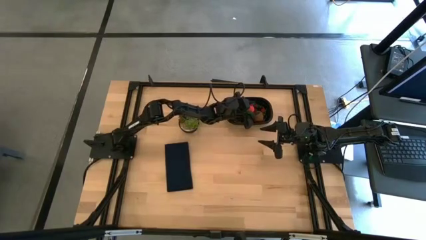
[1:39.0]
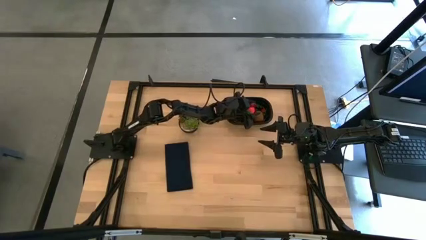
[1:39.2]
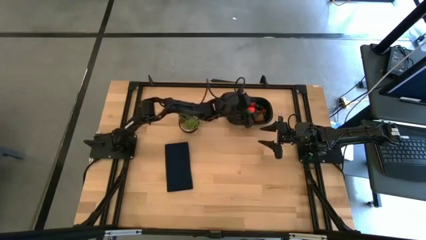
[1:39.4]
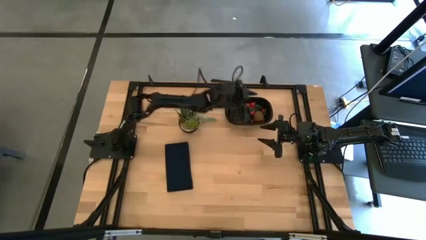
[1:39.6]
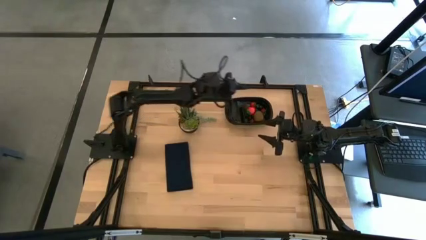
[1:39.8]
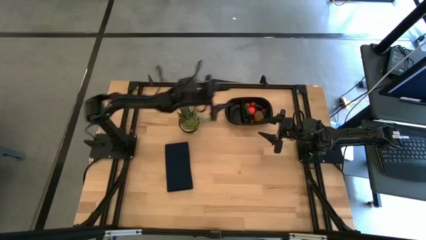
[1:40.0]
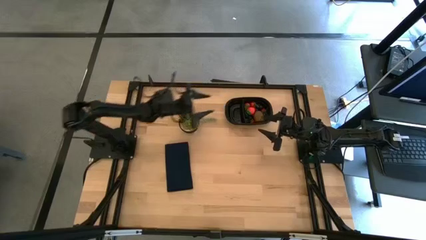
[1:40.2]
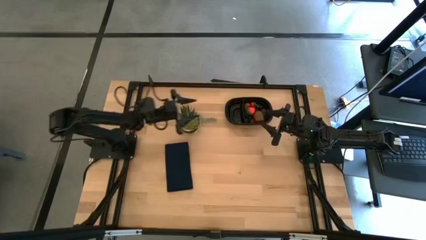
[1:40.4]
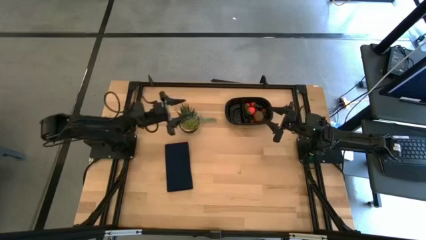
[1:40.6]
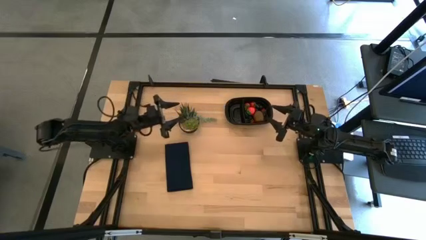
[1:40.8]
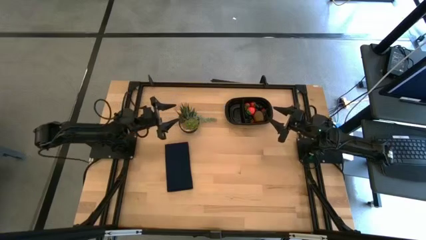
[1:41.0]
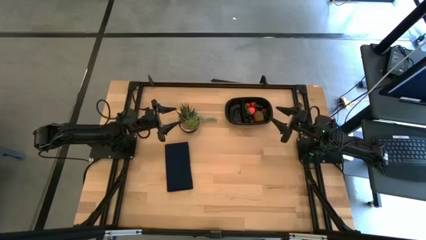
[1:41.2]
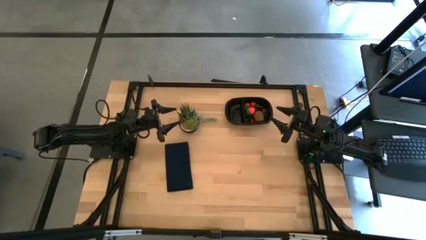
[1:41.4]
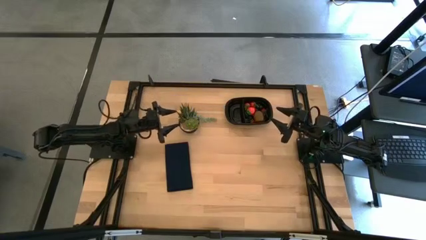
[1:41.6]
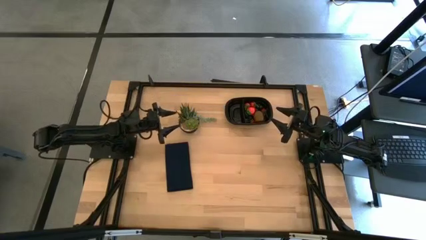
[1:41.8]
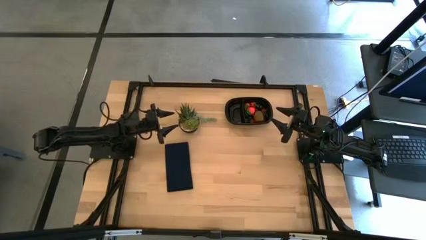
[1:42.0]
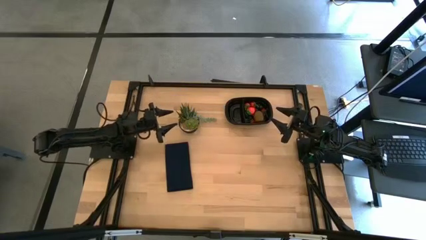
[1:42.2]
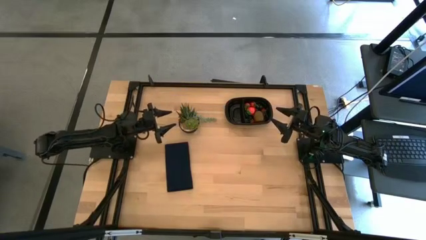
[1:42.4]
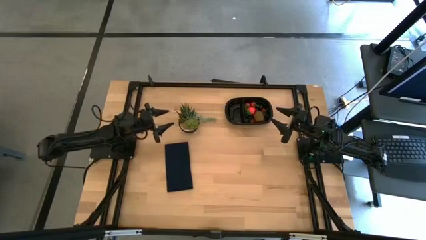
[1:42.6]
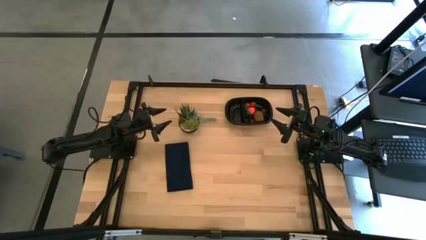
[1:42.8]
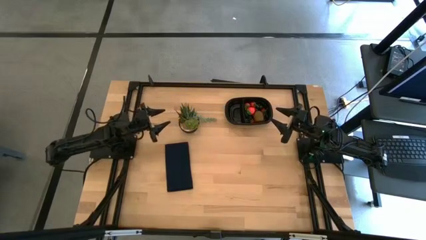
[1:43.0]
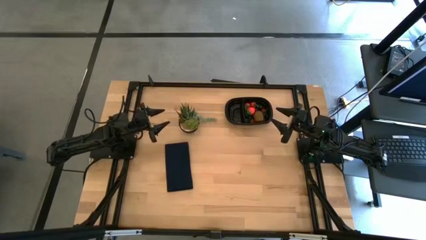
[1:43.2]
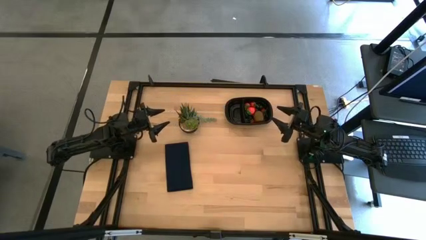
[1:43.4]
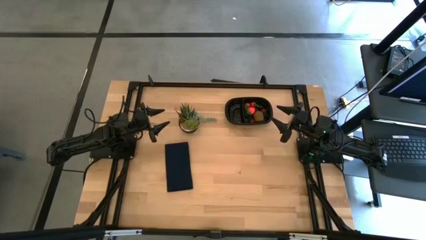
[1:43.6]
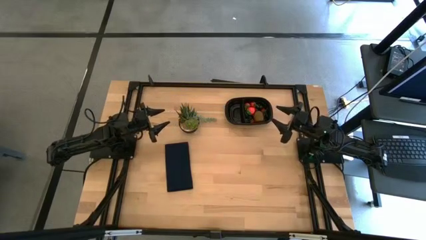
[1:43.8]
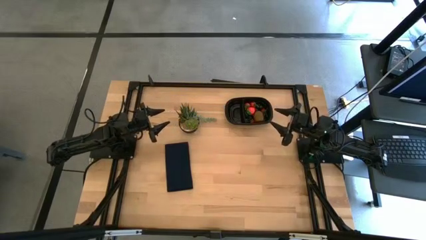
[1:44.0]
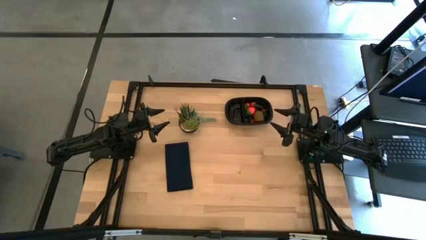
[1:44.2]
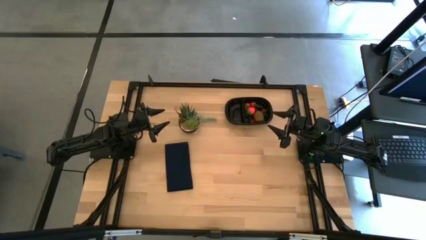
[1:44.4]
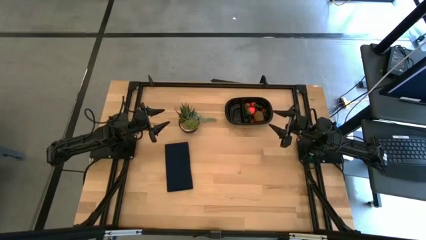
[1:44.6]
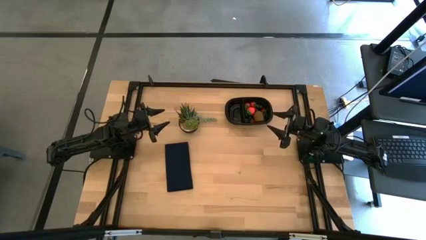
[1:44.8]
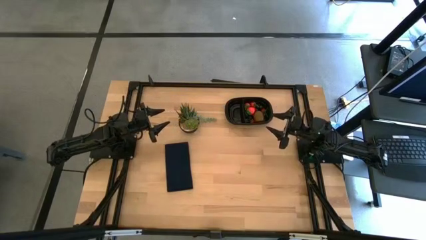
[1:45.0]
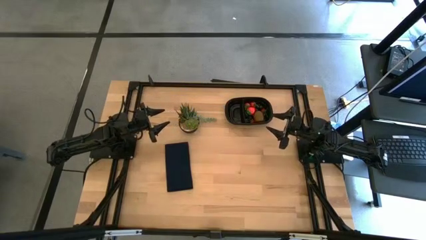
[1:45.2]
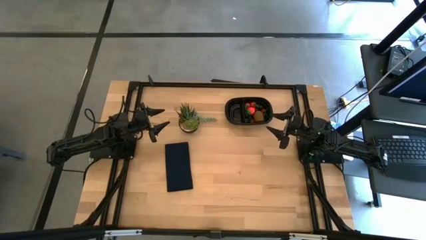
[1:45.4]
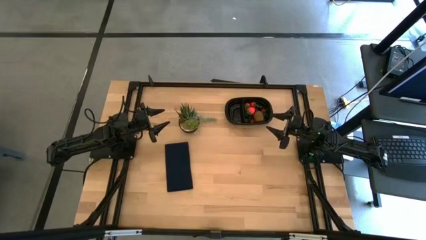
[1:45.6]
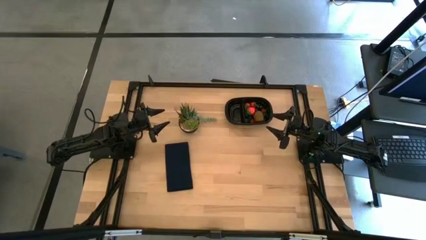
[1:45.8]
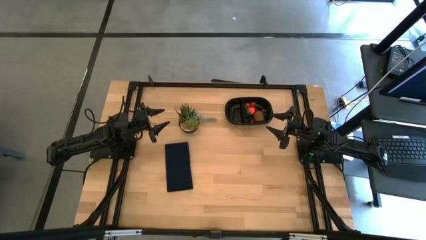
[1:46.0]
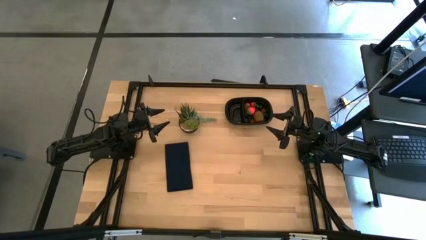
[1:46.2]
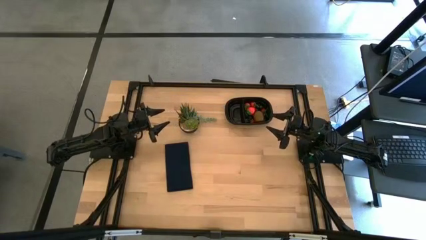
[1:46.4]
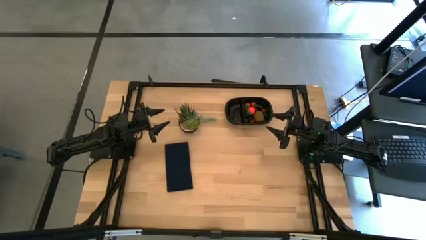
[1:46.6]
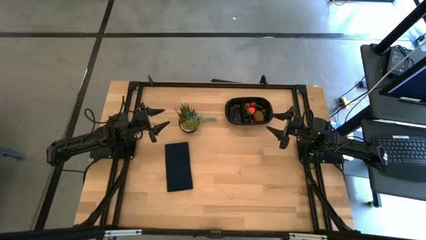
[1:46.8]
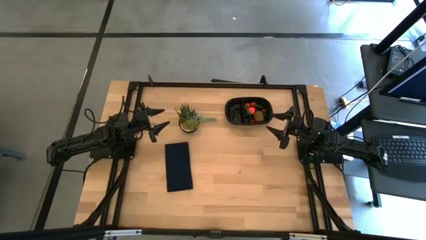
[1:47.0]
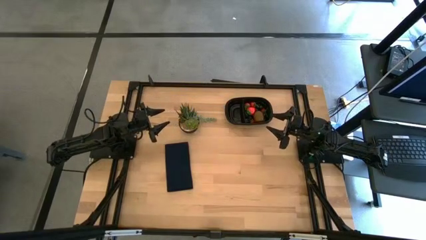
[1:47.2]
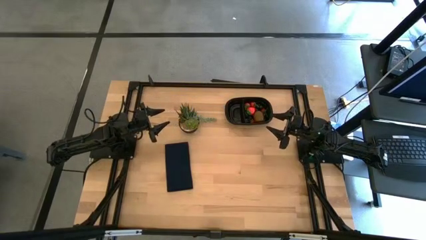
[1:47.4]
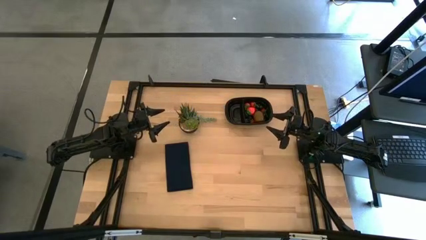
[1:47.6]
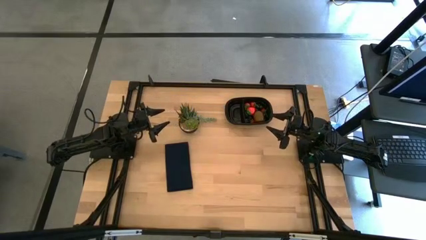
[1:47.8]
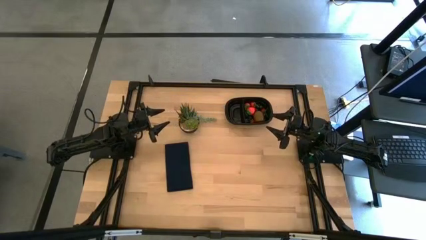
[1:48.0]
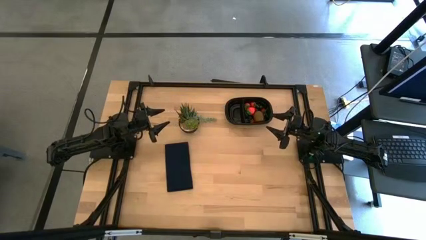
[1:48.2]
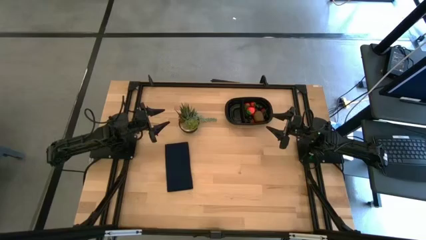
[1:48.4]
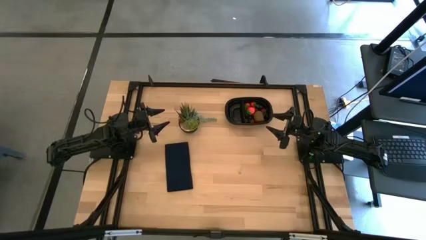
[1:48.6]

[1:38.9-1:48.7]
Task: Pick and placing Produce into tupperware
Return to Home Position

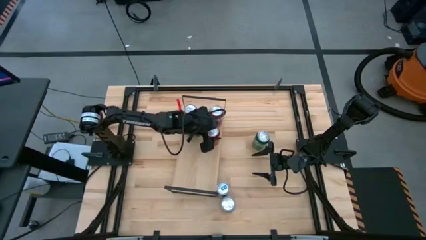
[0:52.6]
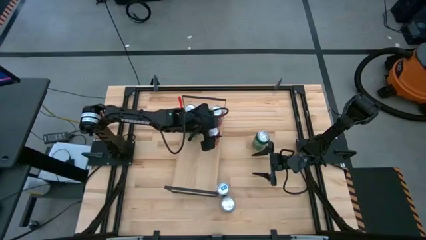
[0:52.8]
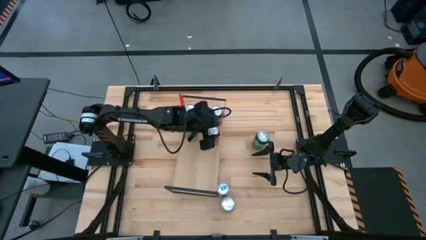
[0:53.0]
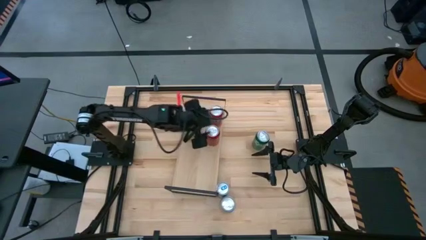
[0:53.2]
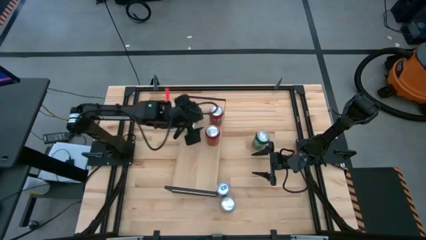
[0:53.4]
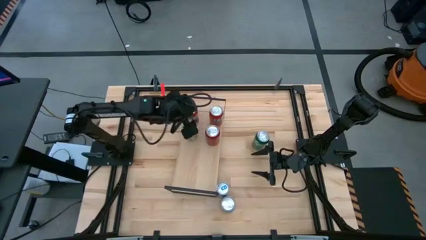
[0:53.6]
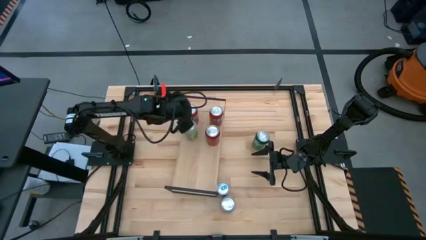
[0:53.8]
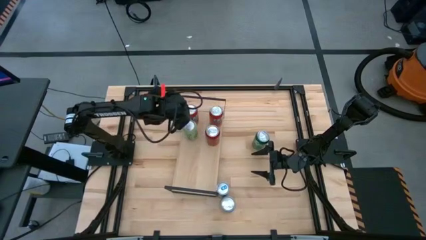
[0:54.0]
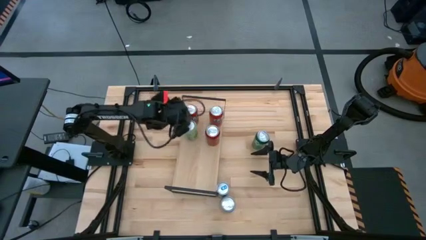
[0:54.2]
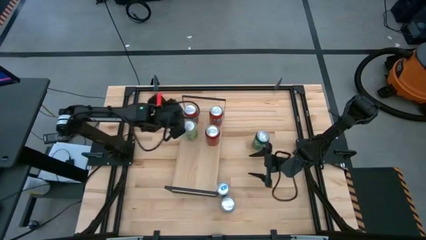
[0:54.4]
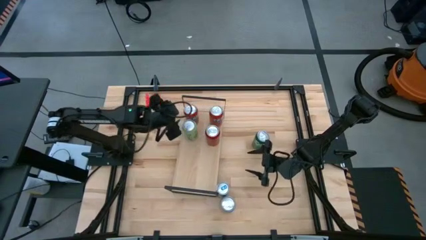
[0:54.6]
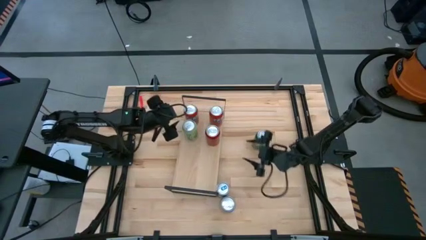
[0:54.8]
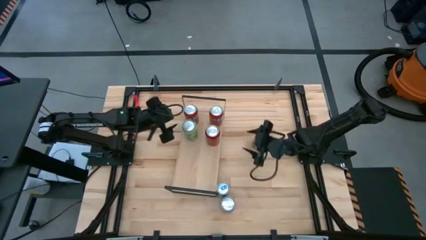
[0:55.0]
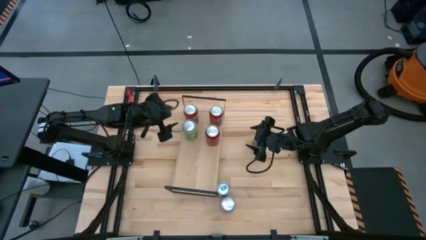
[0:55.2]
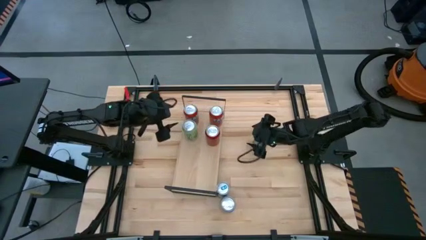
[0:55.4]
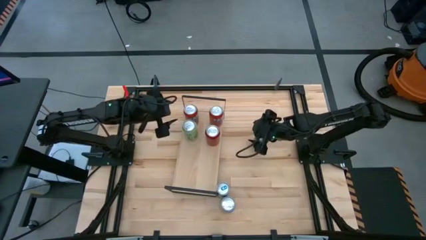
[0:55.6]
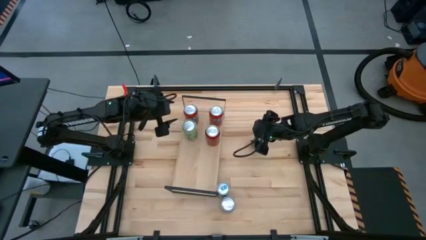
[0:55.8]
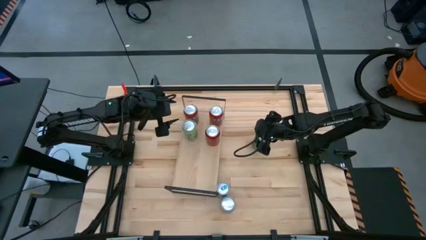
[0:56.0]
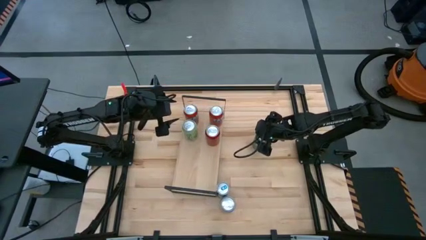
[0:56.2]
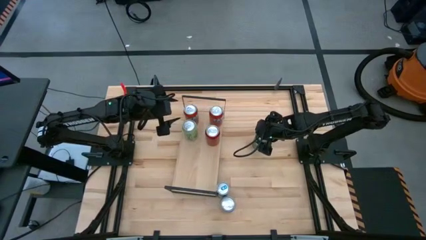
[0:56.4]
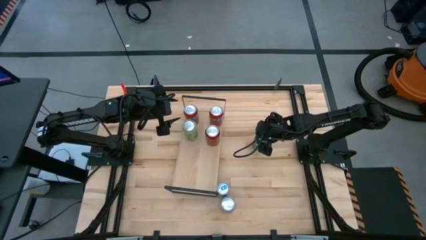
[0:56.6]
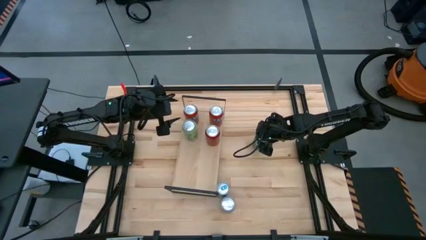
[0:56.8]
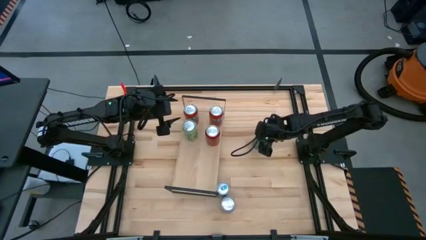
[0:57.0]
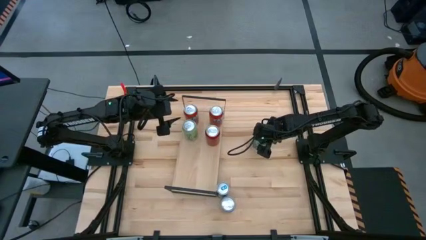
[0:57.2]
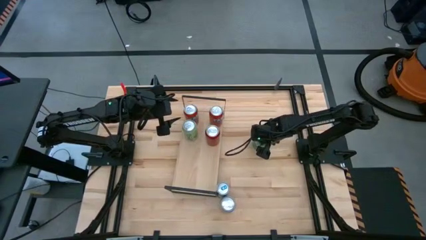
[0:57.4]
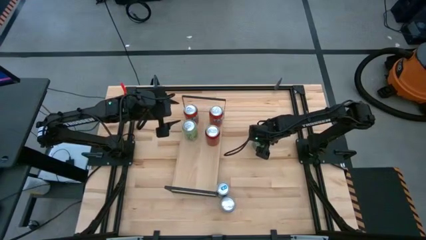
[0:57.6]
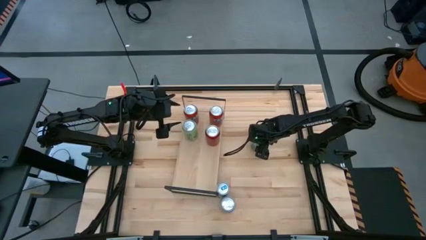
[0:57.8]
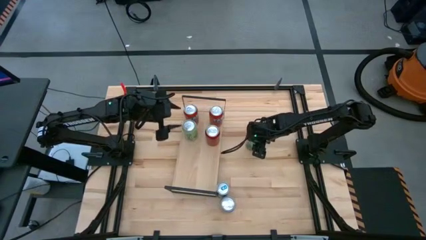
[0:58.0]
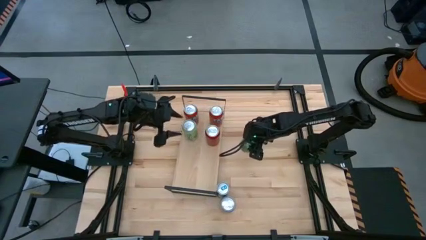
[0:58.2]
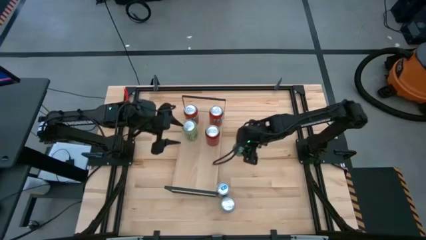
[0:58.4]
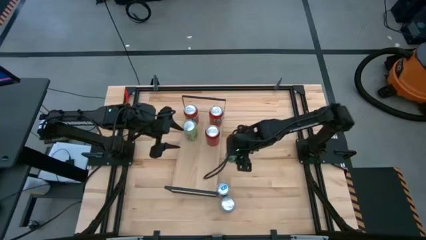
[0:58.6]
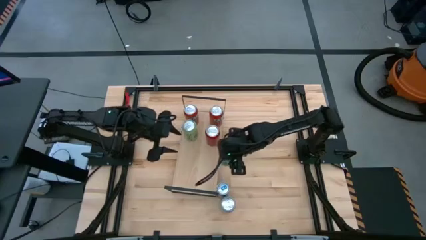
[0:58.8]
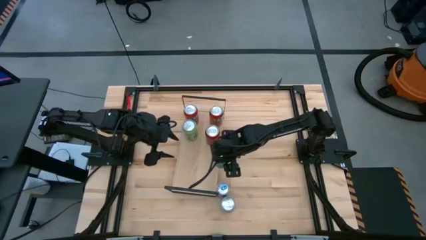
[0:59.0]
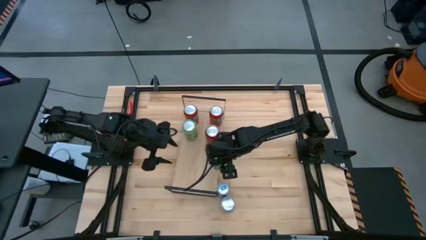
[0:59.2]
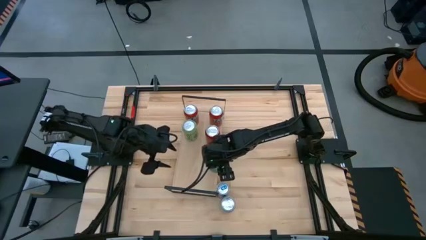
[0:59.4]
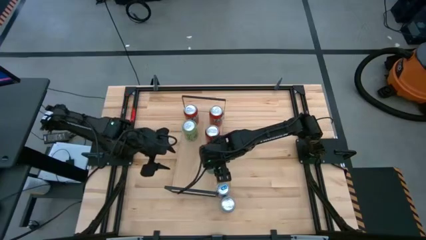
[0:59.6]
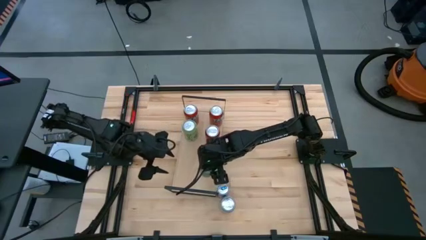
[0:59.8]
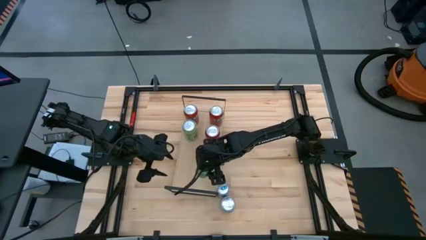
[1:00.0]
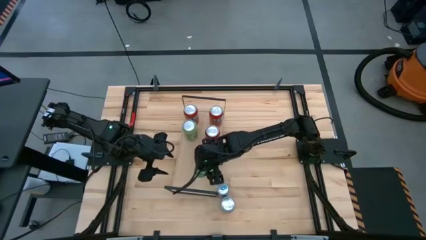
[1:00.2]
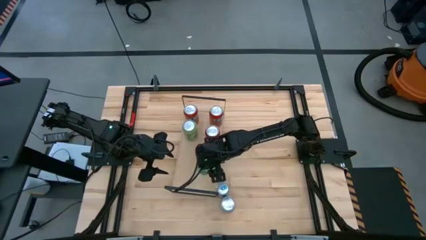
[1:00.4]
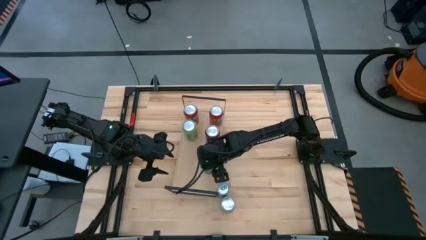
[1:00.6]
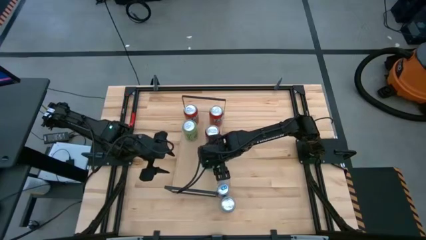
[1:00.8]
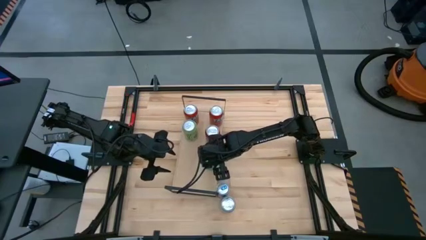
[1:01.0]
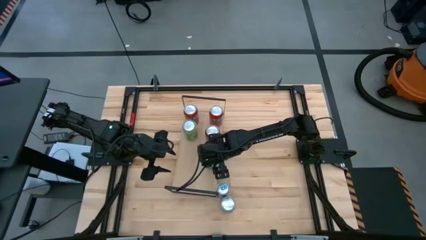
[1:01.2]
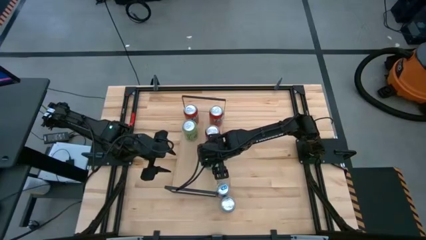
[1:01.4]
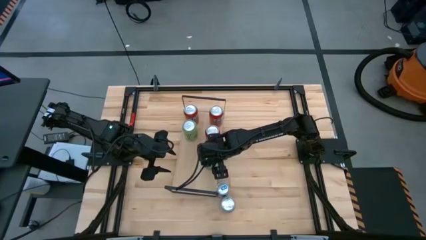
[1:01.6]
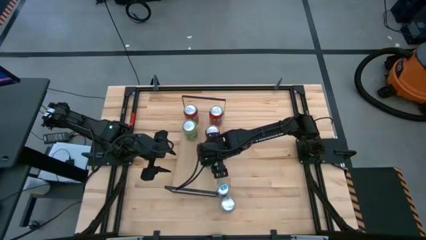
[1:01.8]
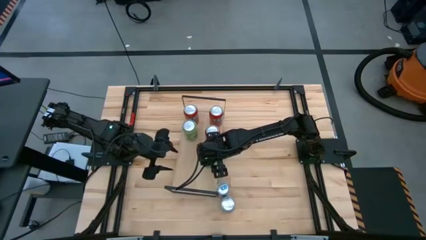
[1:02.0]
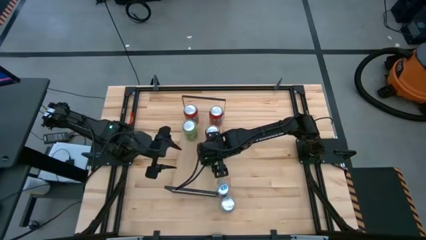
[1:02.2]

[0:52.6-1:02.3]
Task: Place canned beverage on shelf
Put the green soda can on the shelf
